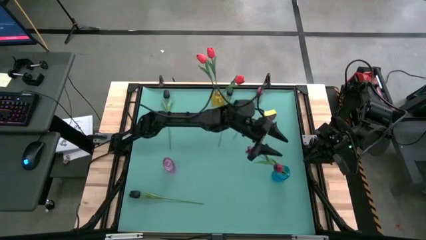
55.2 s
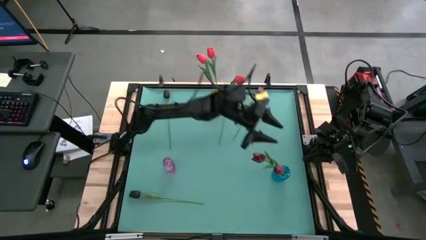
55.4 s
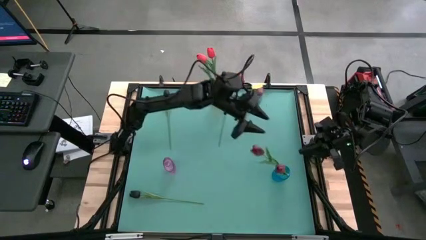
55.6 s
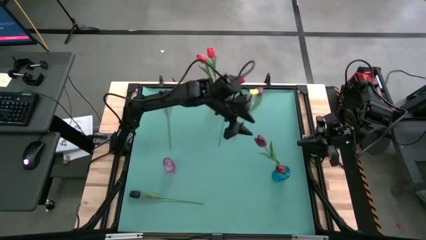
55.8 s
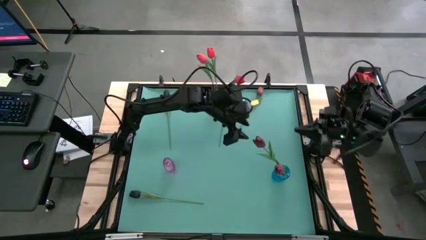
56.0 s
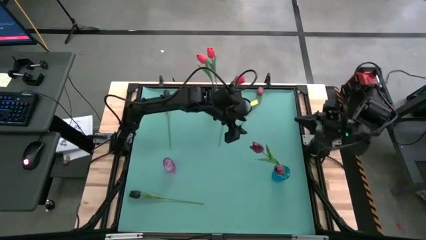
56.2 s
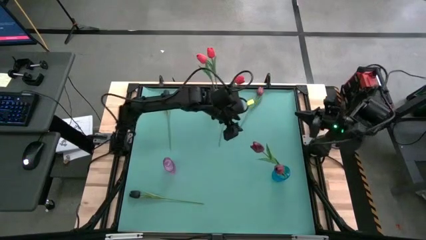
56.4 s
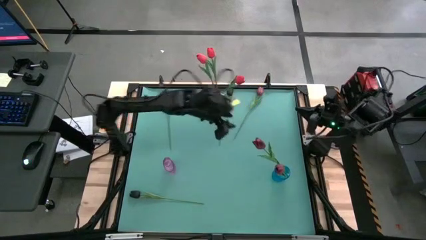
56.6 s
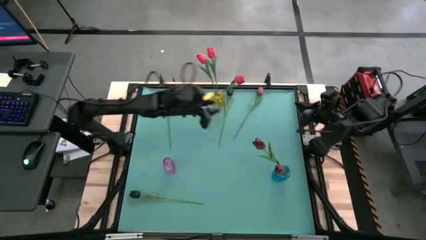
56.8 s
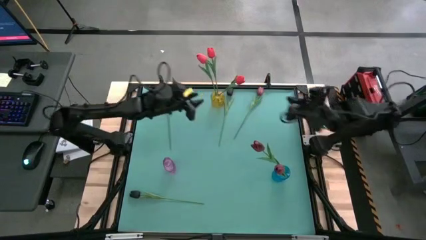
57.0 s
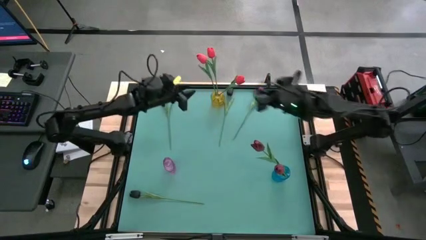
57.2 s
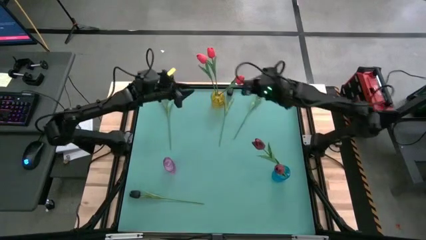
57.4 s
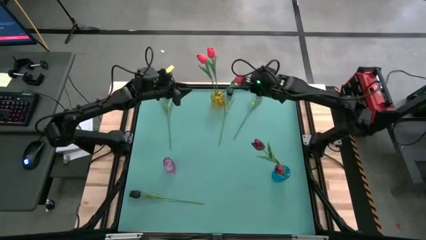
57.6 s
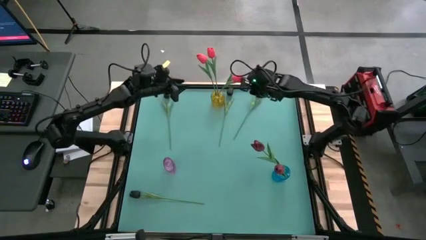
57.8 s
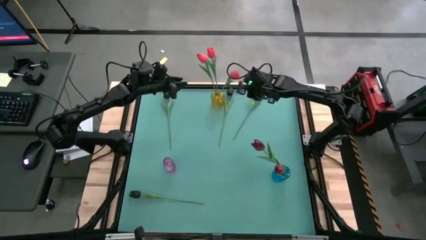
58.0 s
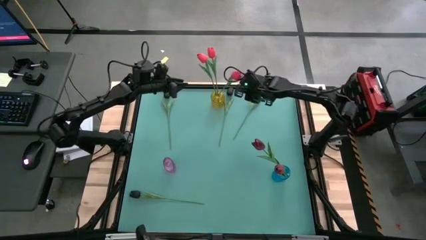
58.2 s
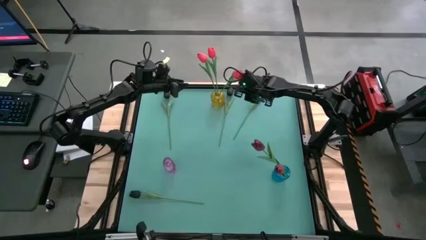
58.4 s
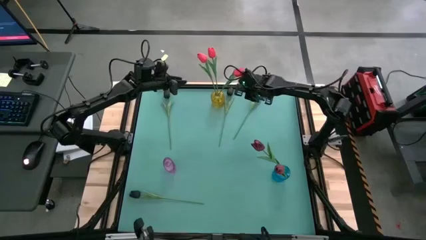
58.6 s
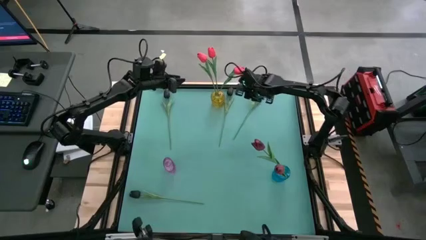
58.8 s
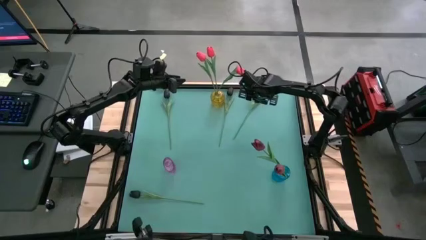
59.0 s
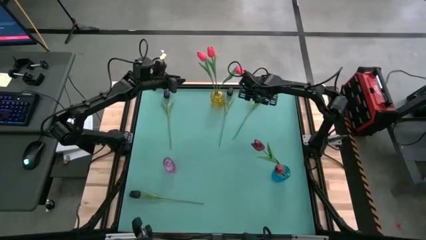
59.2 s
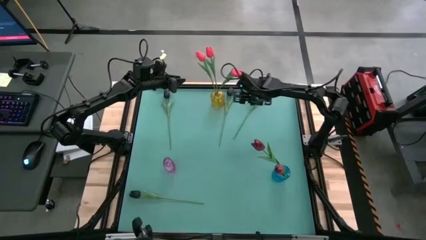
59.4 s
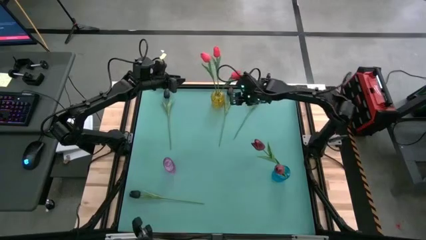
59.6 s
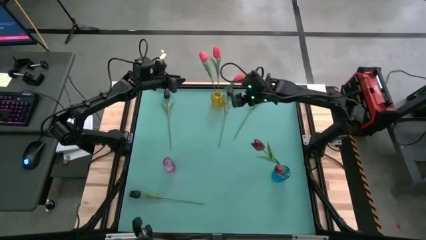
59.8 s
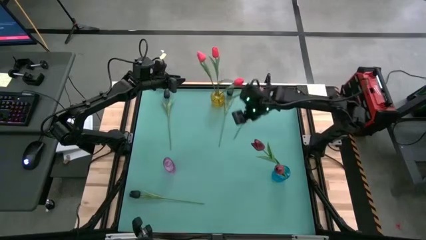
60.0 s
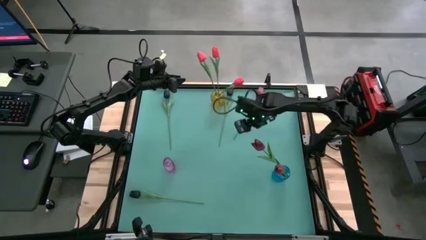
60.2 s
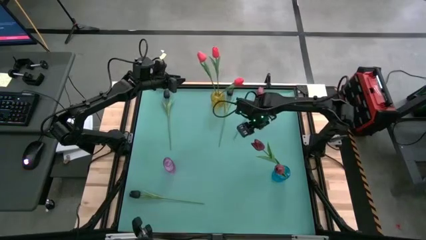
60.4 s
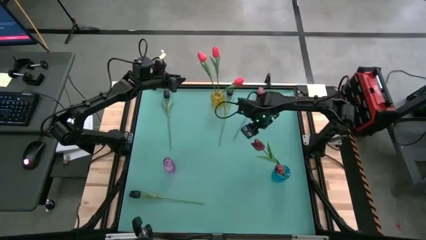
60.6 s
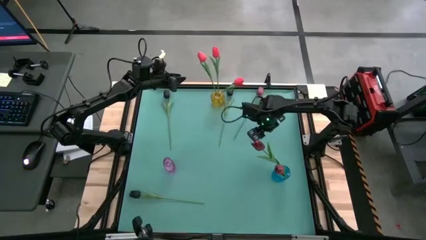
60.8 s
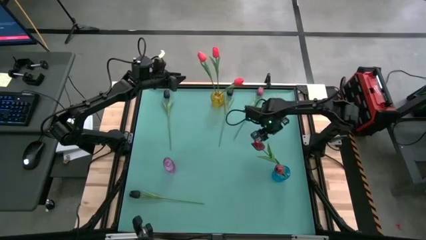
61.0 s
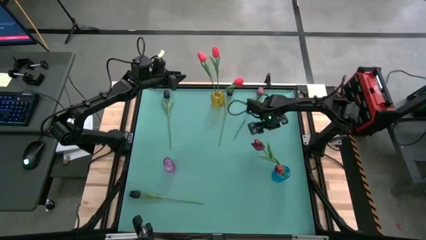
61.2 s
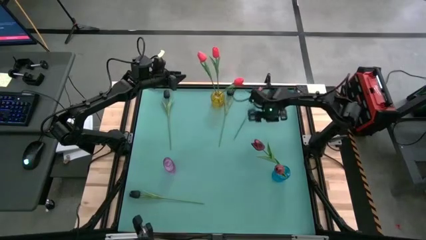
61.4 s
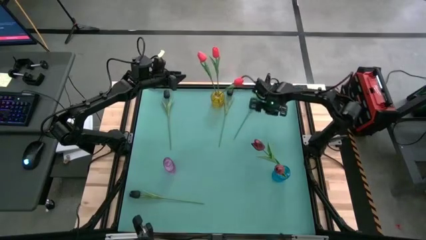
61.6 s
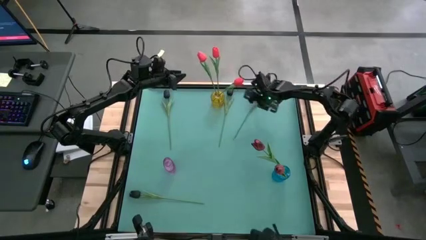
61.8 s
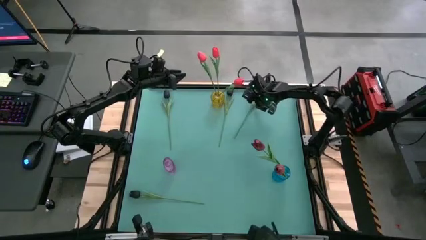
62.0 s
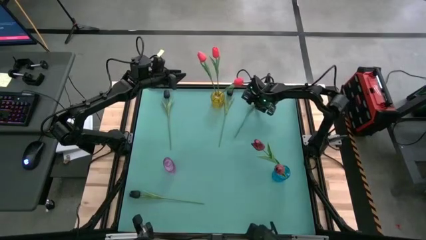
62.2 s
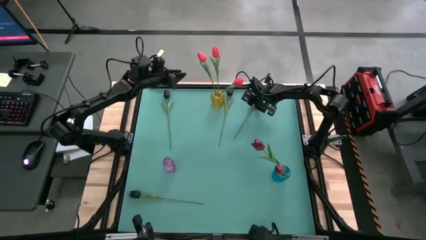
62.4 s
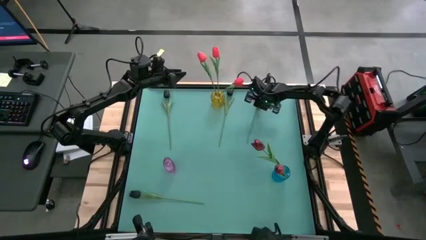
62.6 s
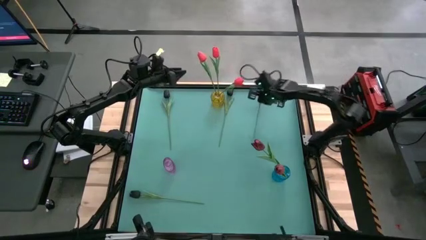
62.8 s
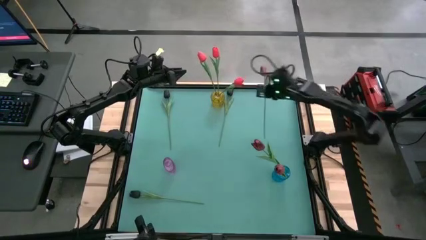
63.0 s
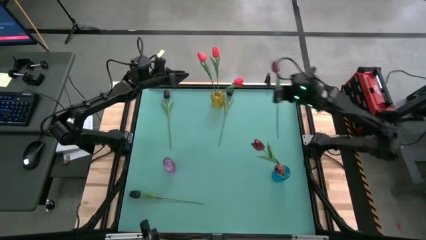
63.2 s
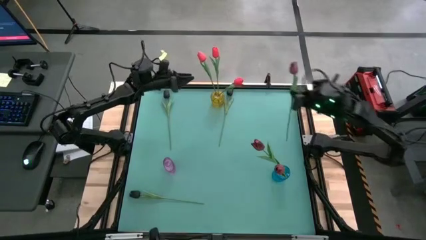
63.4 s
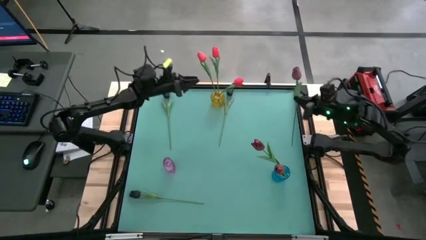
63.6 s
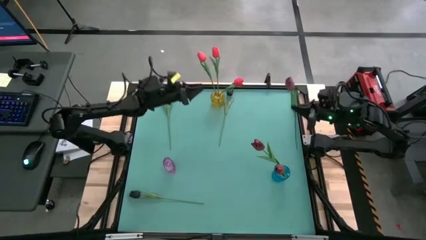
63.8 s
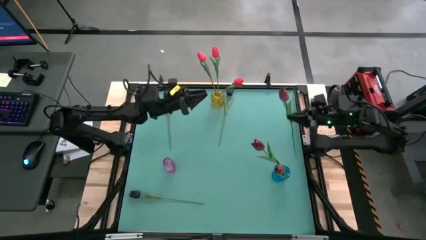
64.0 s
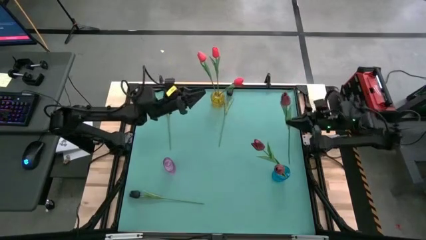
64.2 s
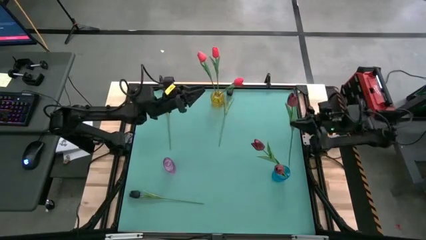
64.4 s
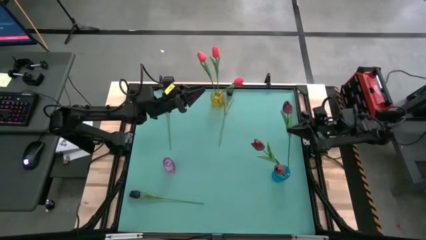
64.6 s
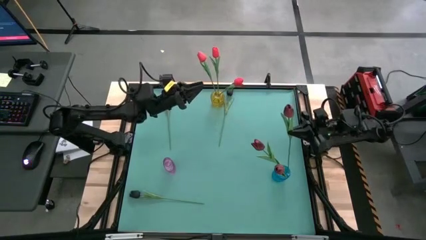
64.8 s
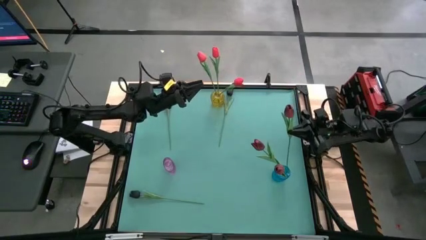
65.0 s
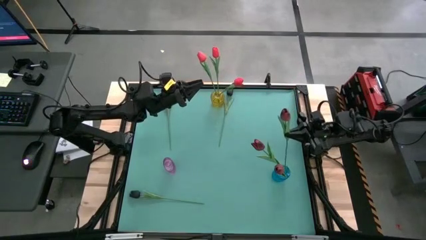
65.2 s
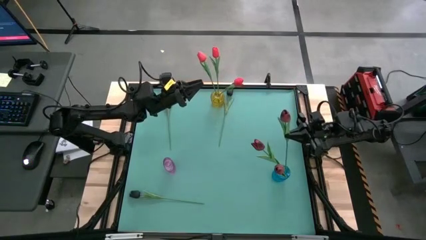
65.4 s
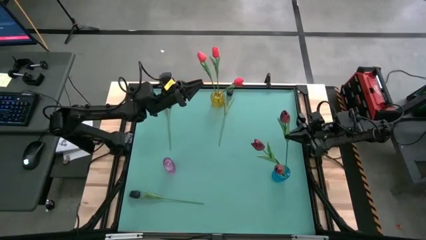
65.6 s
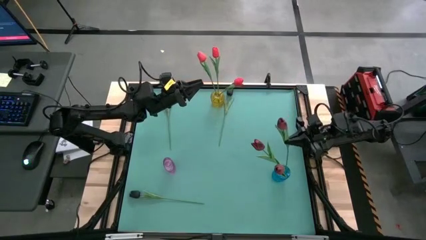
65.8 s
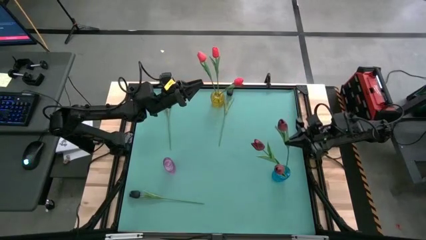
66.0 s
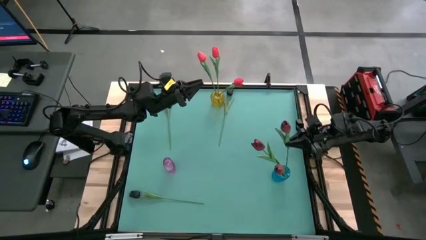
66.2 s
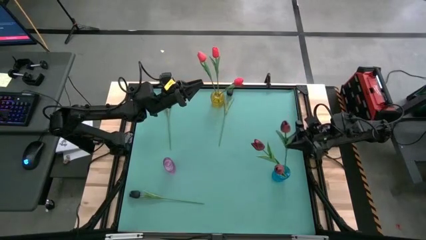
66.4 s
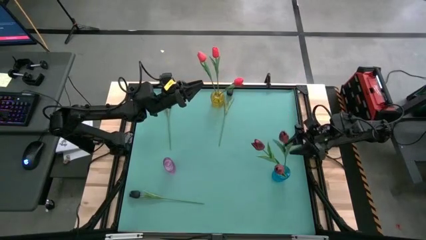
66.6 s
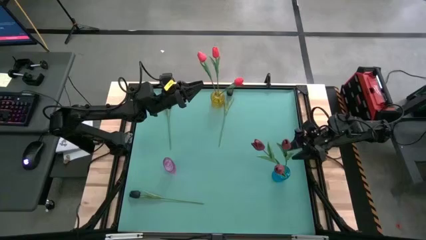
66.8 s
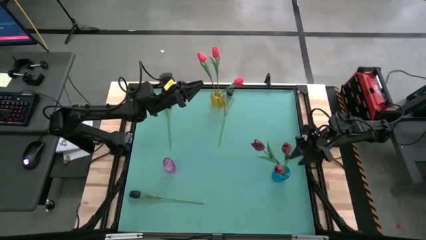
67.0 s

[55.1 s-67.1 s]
Task: Sort flowers into vase by color
Put the dark red tulip into the blue vase

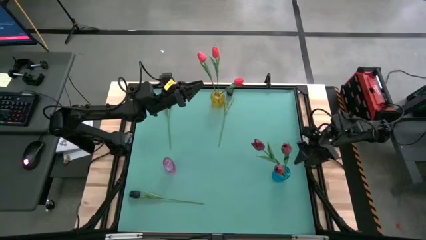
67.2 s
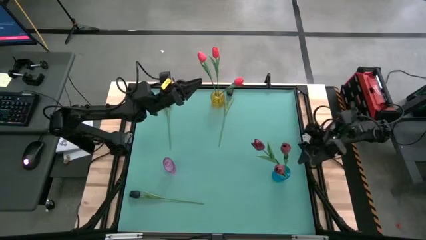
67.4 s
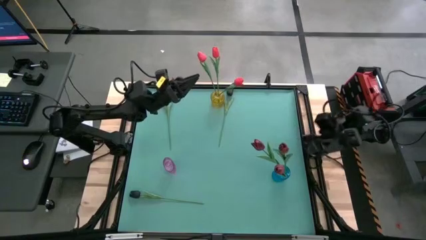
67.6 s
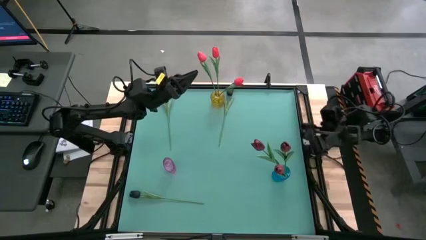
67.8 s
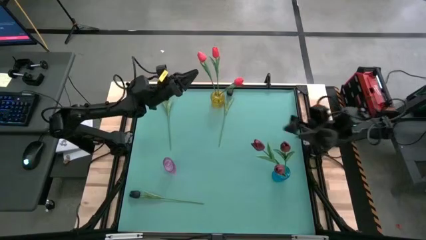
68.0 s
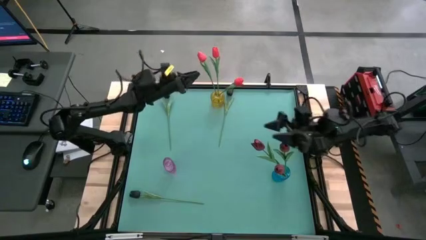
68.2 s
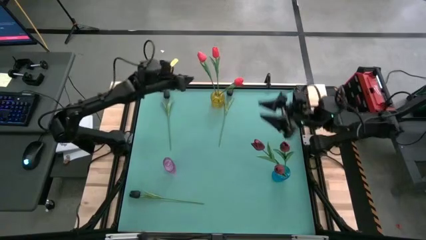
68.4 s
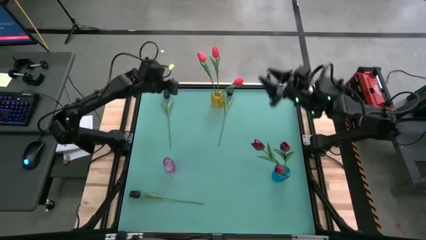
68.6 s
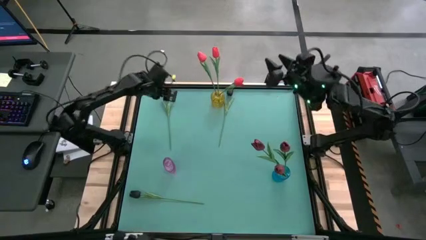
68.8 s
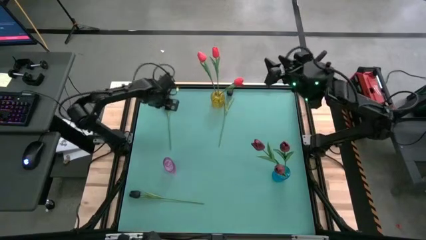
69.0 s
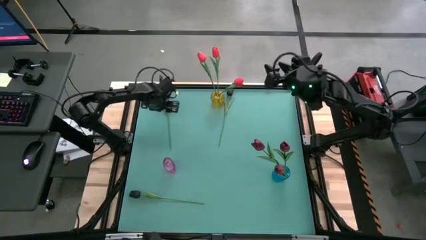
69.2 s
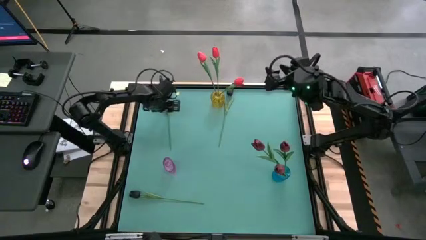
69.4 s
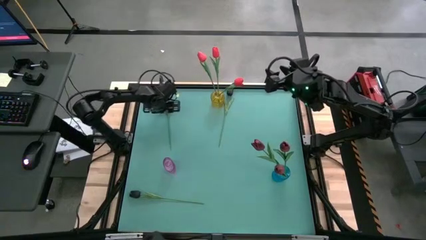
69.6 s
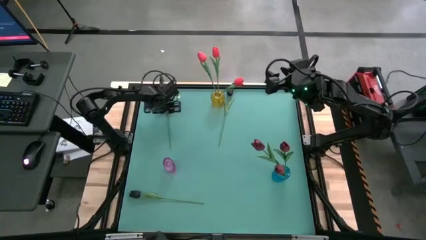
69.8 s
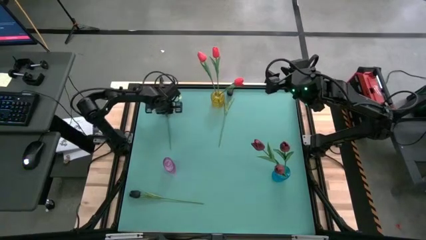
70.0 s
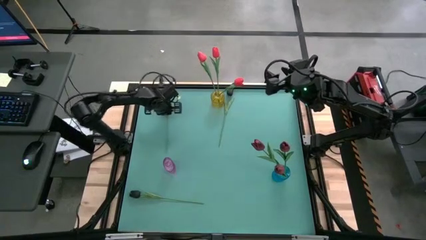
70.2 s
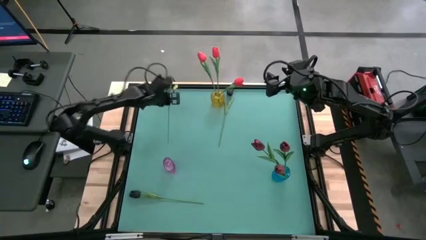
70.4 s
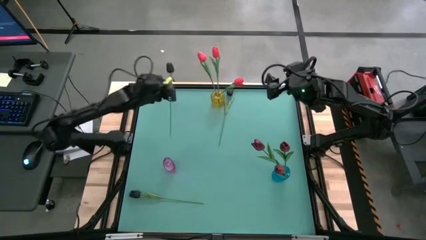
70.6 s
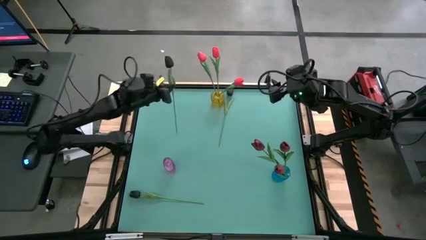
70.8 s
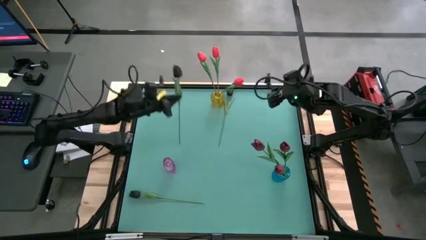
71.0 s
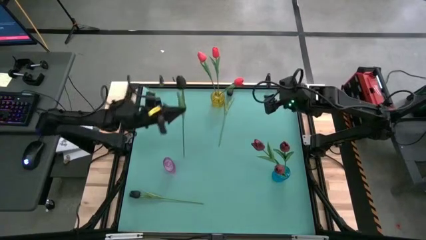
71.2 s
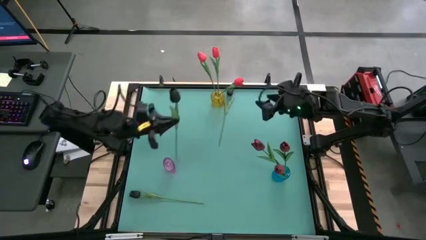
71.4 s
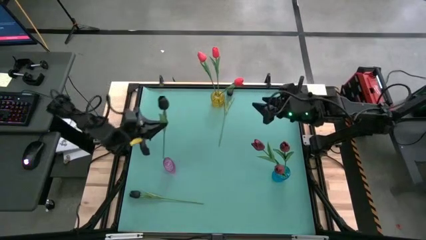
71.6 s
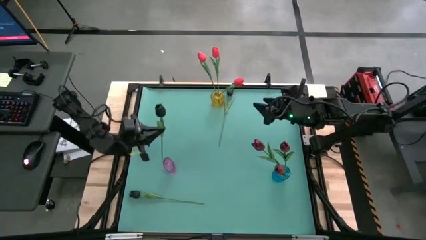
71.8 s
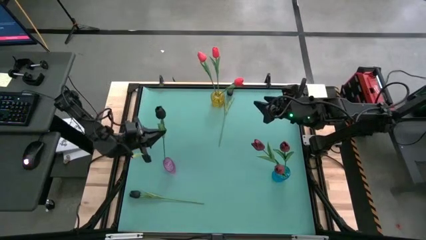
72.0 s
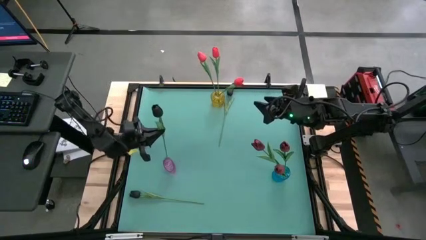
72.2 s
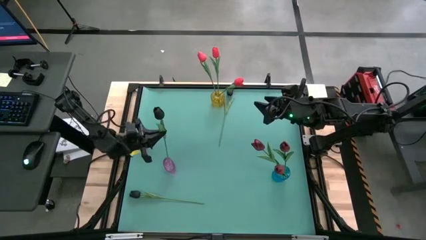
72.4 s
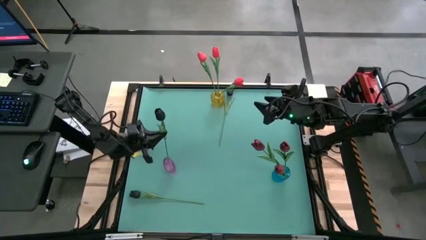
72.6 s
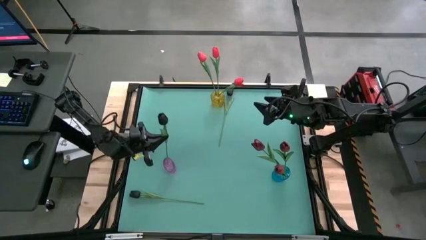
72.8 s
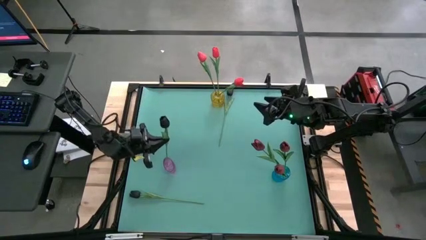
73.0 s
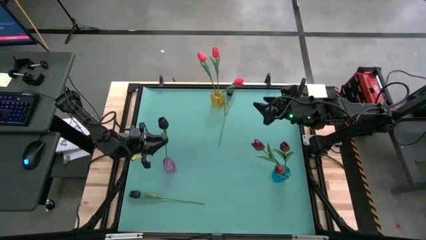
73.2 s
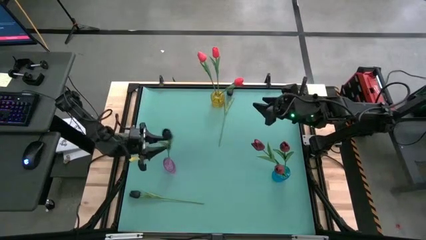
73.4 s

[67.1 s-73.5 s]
Put the top left black tulip into the violet vase
